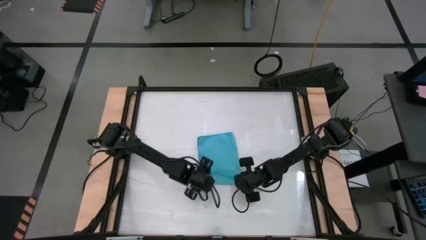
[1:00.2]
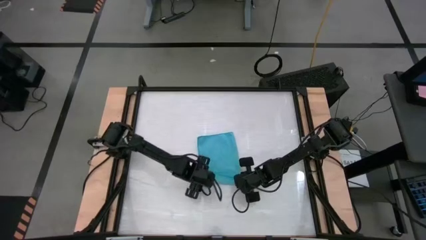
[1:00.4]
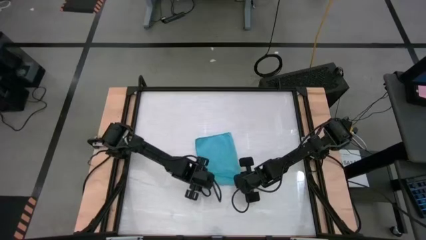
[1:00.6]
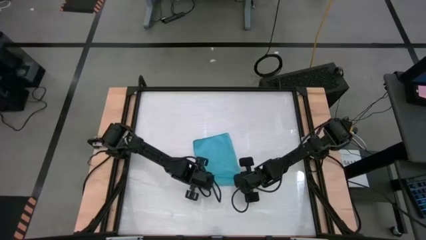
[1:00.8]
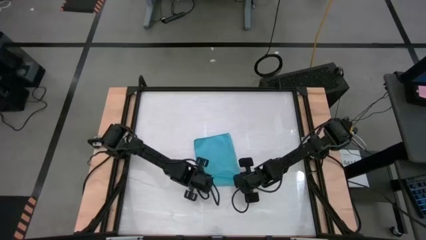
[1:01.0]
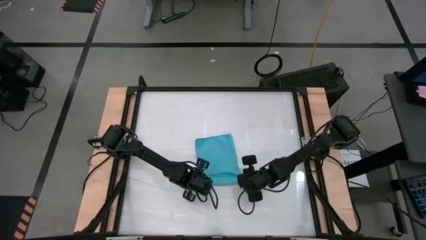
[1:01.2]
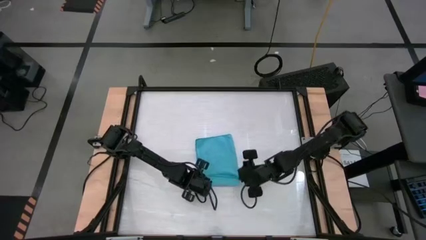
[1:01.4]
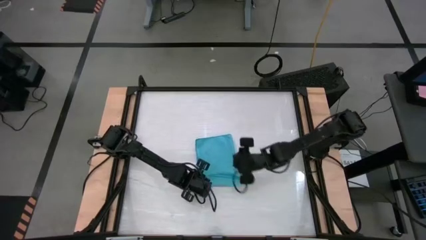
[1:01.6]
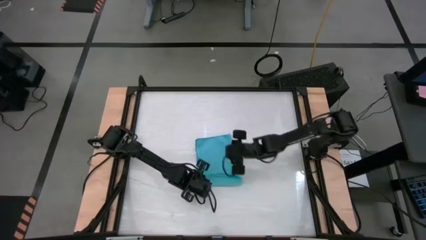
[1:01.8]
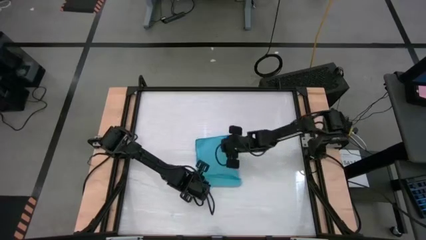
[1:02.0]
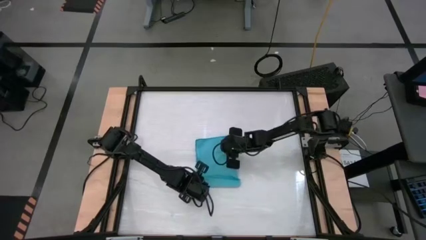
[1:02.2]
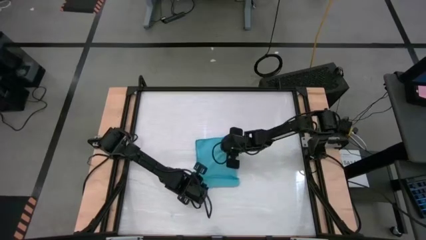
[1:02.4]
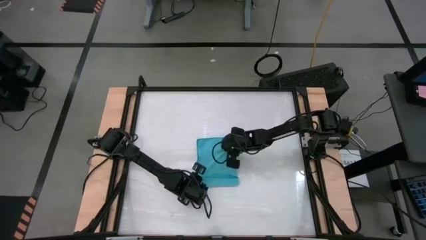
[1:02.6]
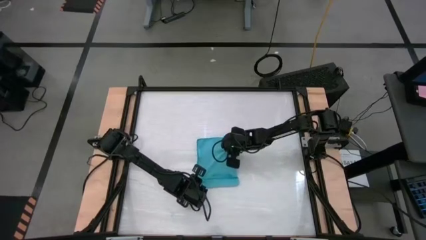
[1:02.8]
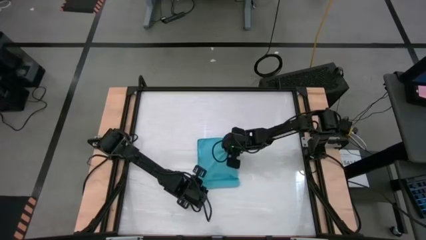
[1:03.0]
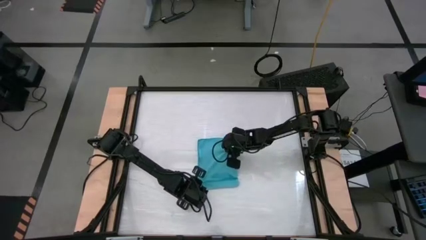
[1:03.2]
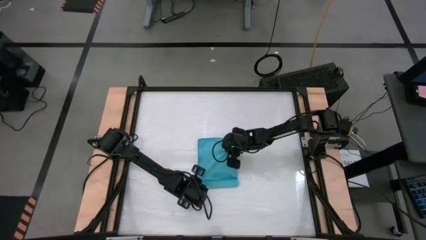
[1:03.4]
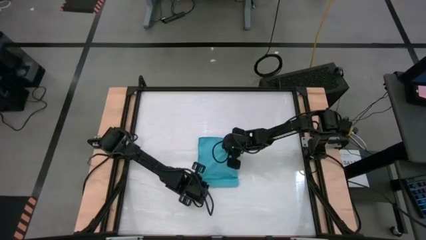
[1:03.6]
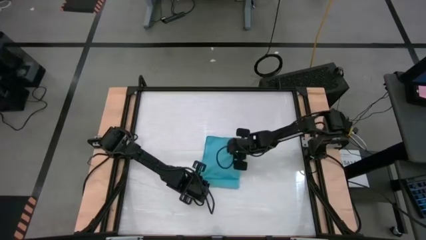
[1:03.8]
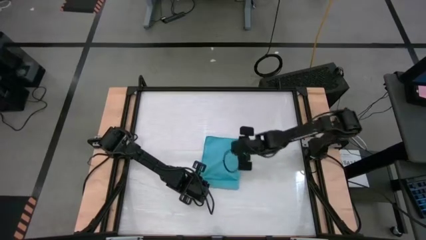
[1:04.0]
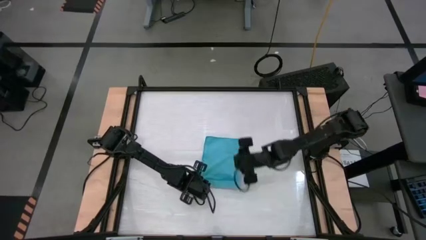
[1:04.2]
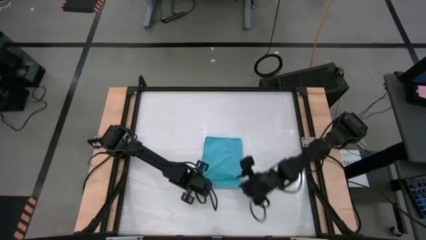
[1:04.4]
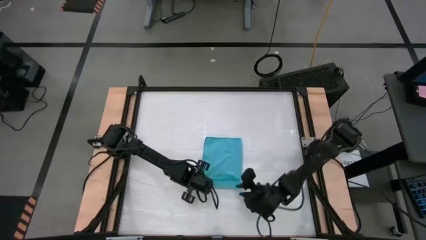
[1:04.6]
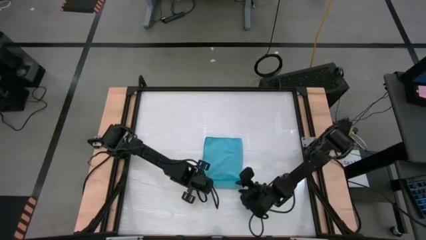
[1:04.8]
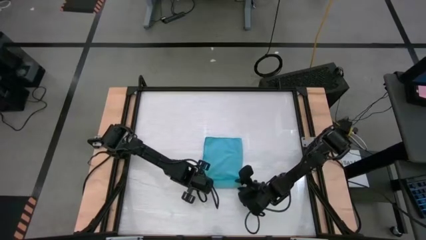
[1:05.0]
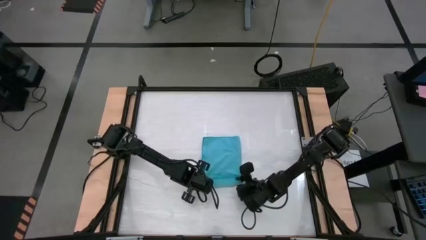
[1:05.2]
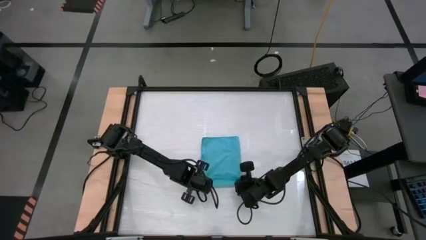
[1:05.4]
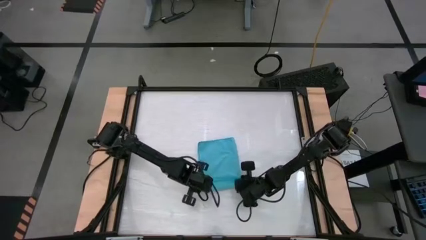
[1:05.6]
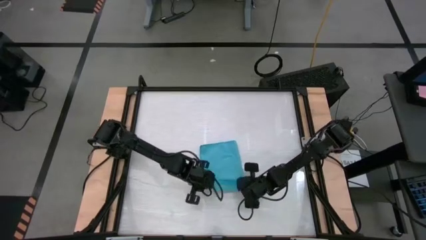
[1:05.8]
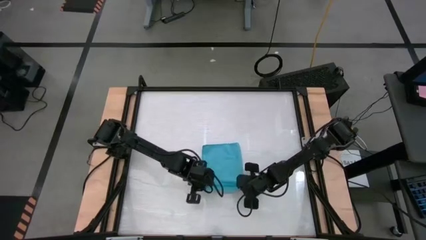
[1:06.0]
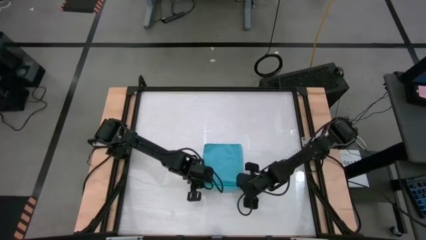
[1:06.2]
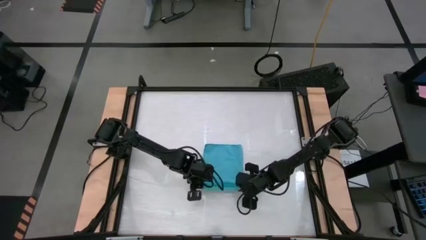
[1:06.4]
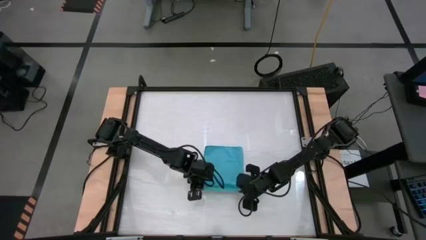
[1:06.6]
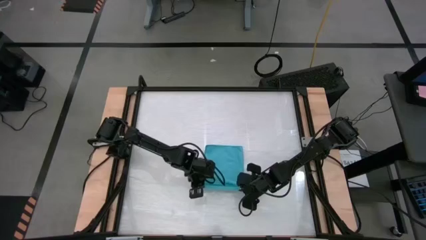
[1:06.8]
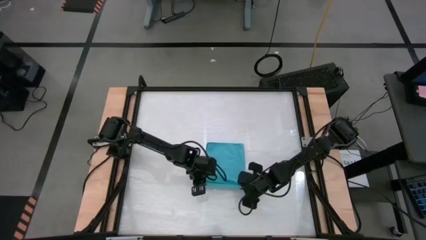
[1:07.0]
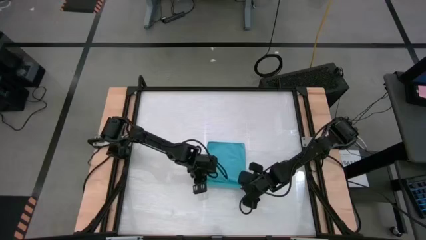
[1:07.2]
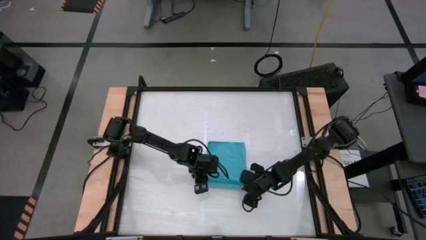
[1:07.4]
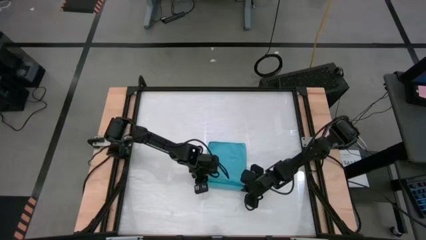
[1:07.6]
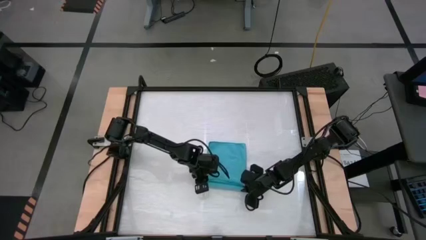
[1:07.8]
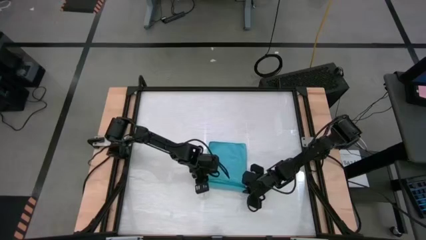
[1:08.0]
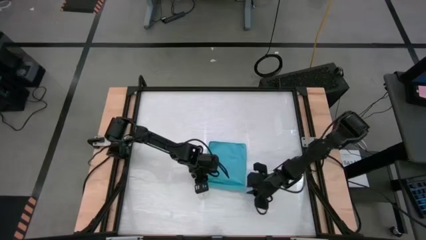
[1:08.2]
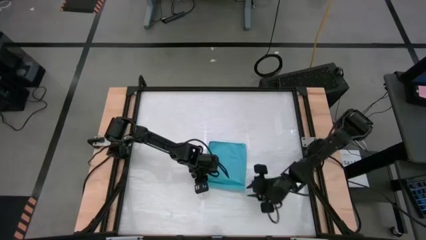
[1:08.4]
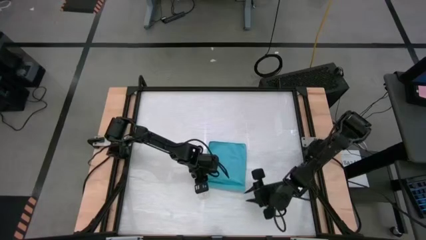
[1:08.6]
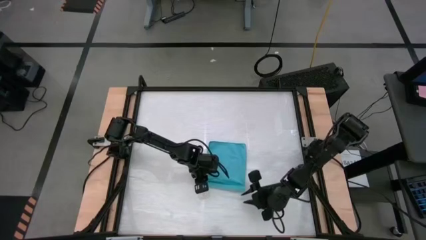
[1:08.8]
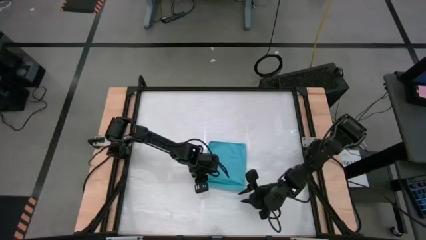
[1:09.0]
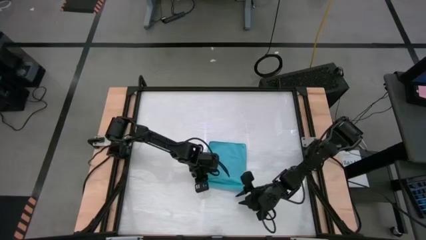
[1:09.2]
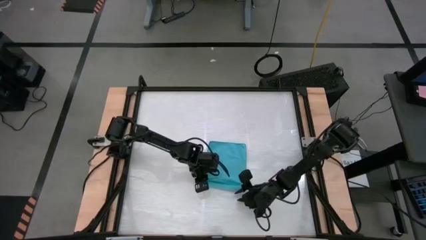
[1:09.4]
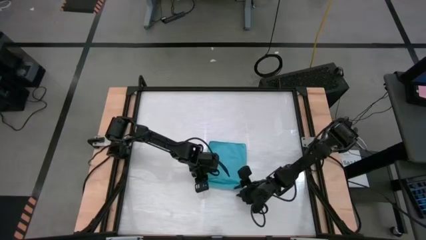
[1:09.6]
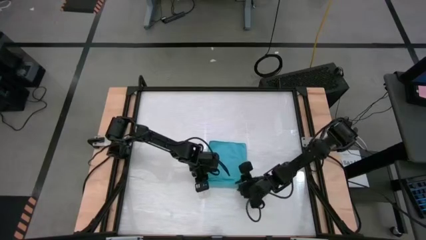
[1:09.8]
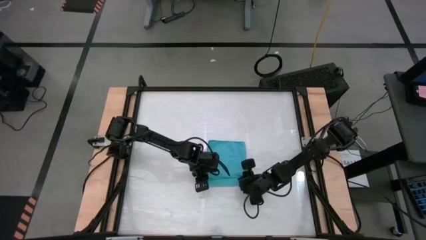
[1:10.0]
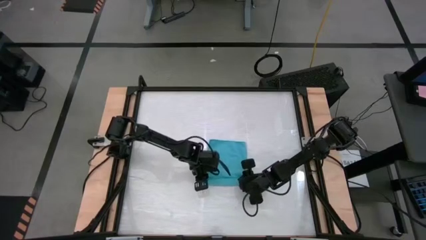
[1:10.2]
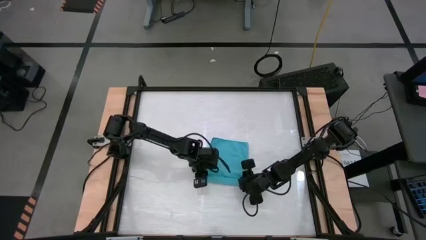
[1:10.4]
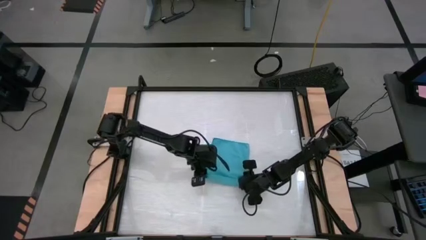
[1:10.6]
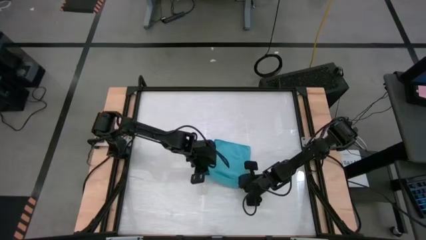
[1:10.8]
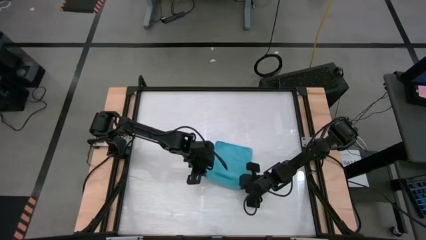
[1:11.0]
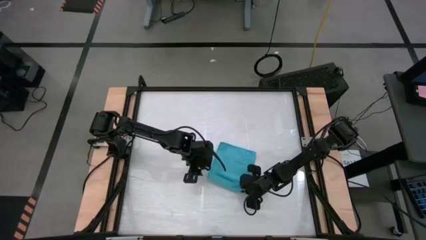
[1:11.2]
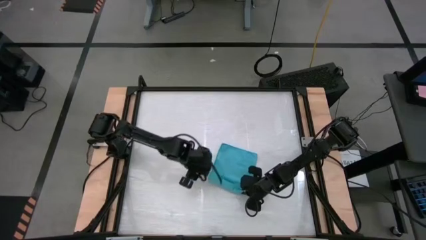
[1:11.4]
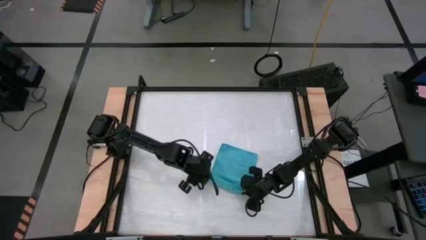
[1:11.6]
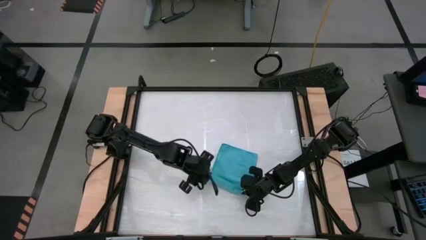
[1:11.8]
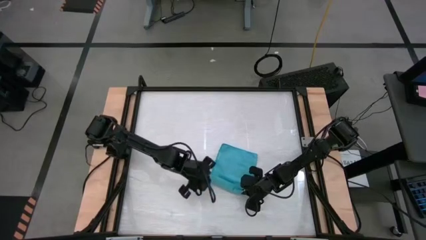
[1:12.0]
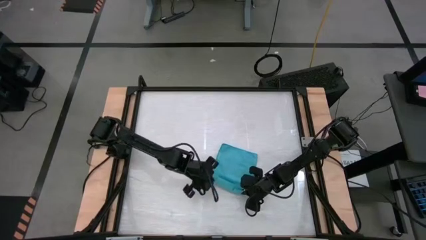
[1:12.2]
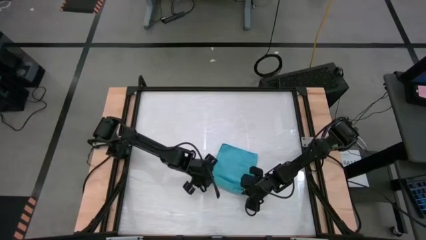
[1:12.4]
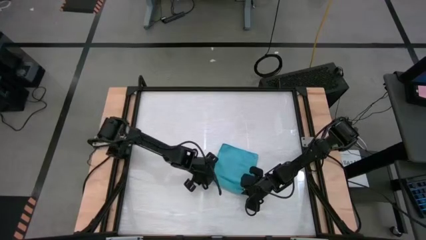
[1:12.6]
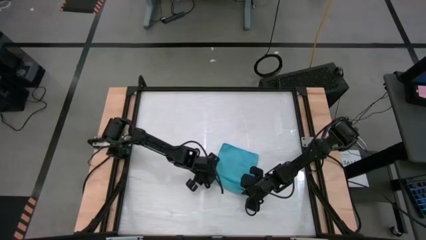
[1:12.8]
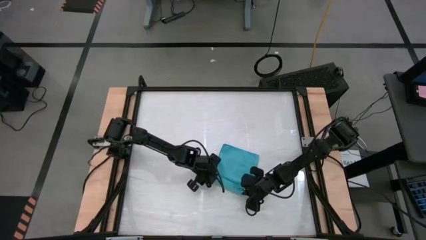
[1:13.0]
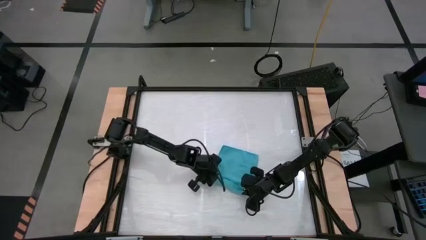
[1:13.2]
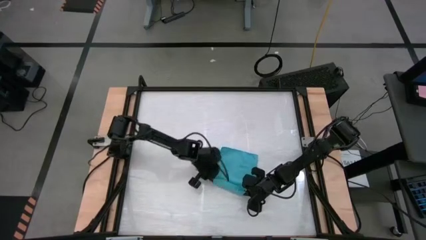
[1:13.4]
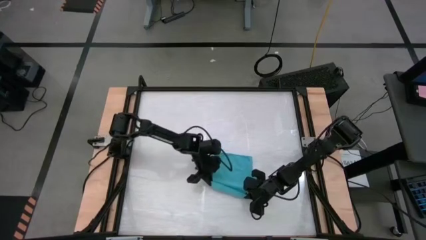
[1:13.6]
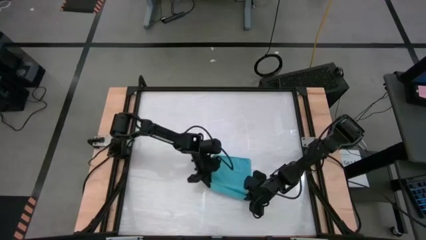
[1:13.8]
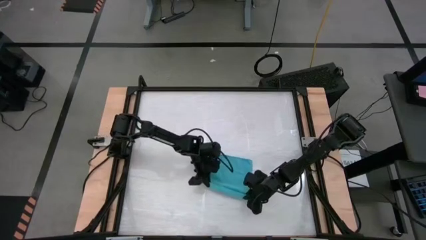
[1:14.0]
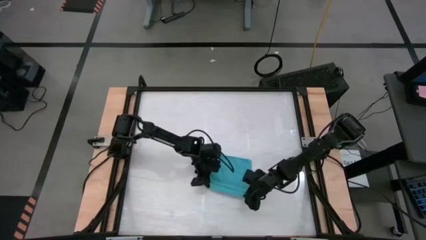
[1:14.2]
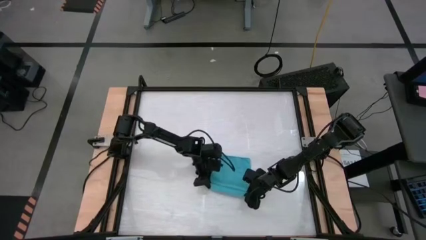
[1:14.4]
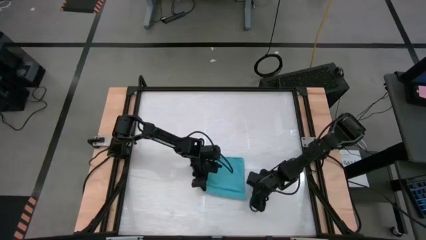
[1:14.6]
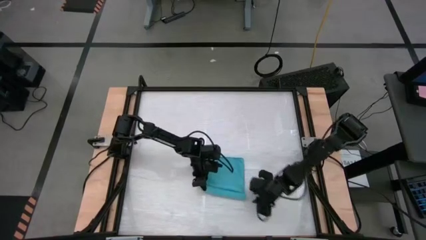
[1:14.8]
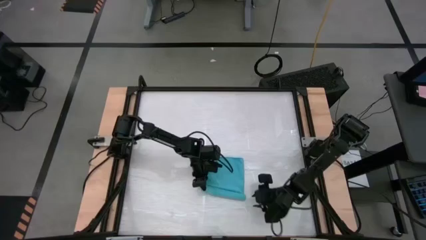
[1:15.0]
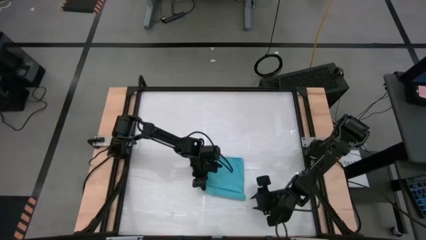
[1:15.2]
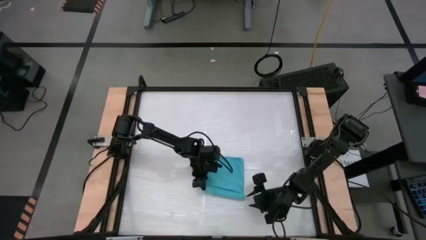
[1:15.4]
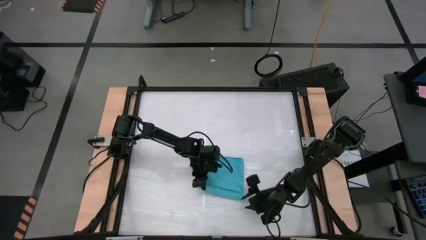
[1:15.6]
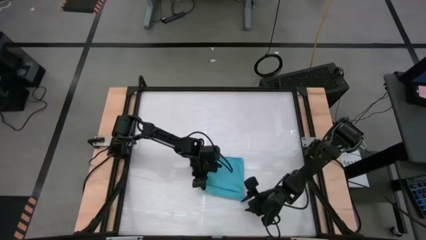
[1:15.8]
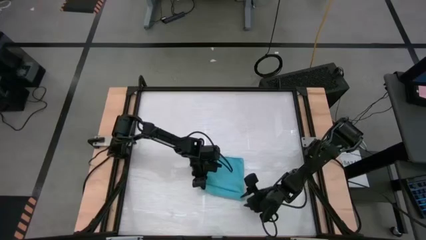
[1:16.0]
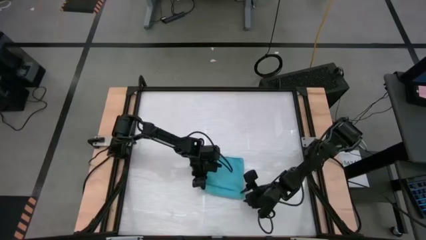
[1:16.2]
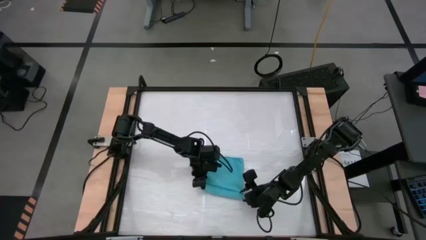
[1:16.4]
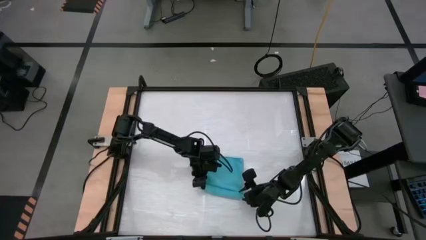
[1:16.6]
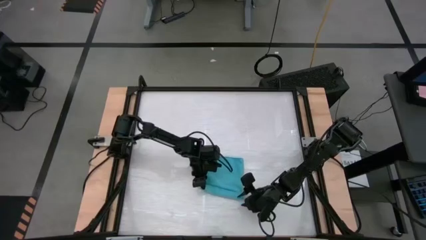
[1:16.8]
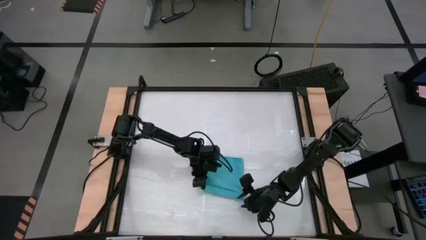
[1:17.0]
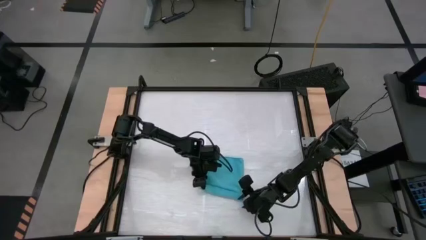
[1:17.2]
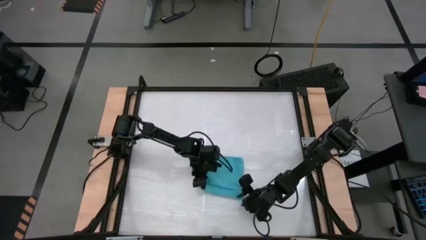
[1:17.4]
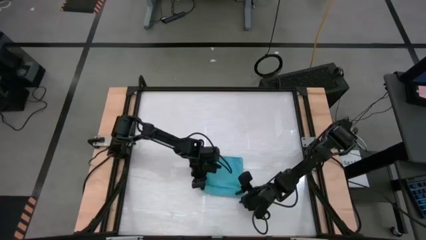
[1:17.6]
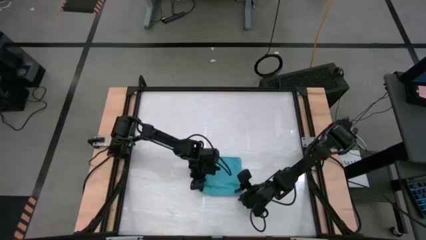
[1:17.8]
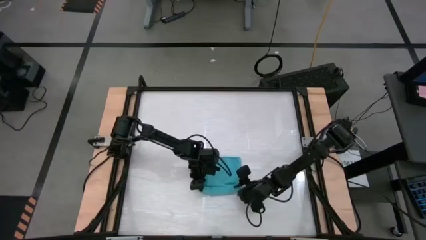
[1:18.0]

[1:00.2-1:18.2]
Task: Roll towel
Roll the blue microfiber towel
